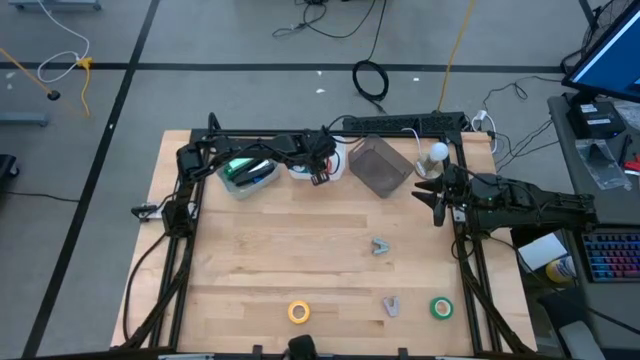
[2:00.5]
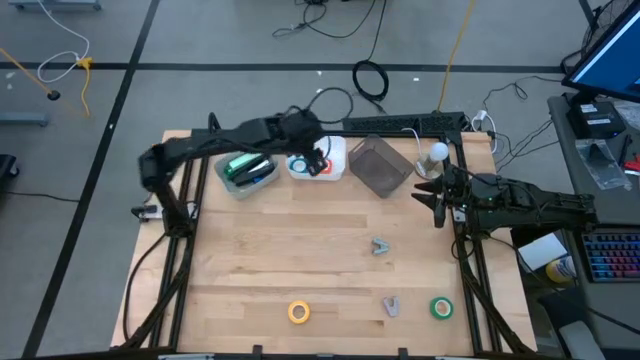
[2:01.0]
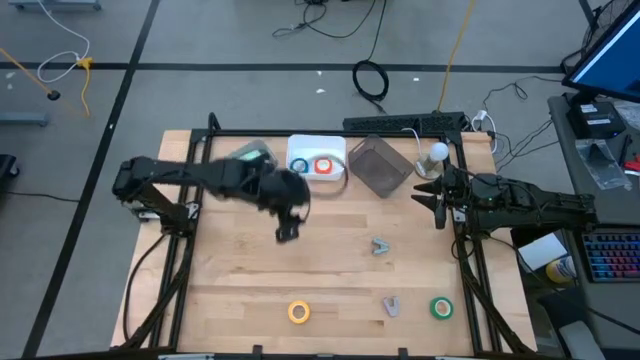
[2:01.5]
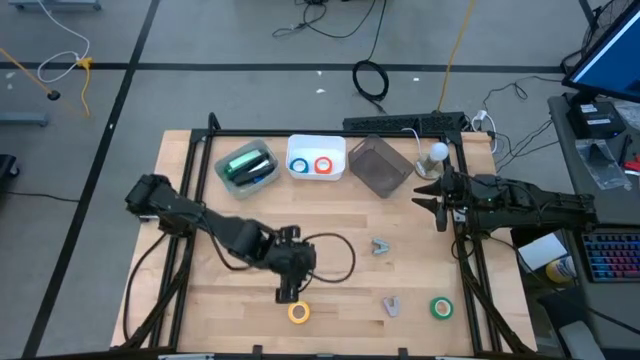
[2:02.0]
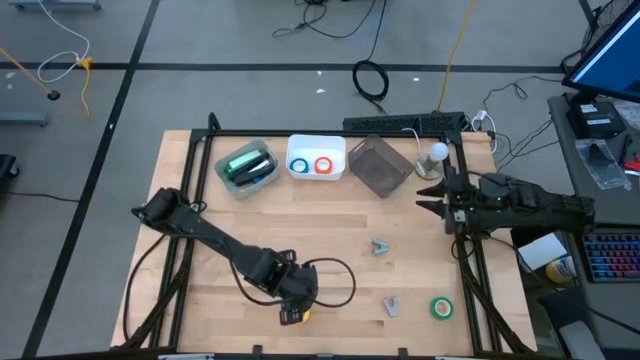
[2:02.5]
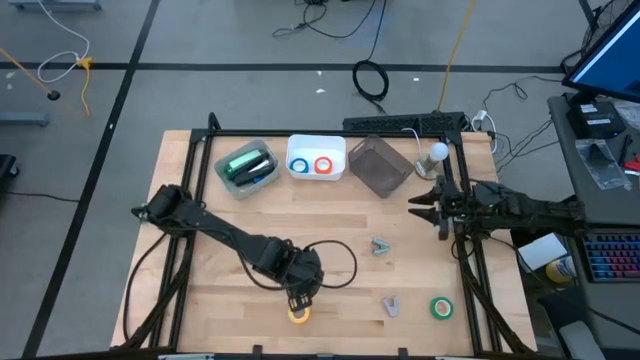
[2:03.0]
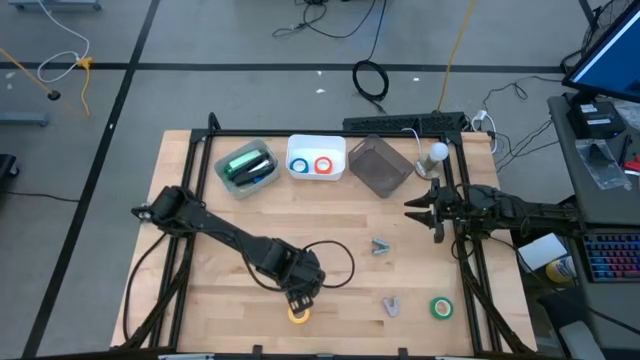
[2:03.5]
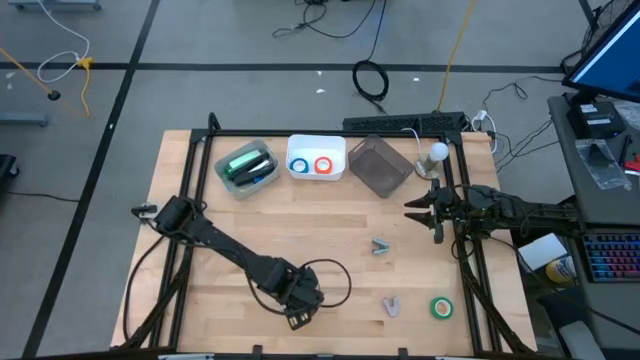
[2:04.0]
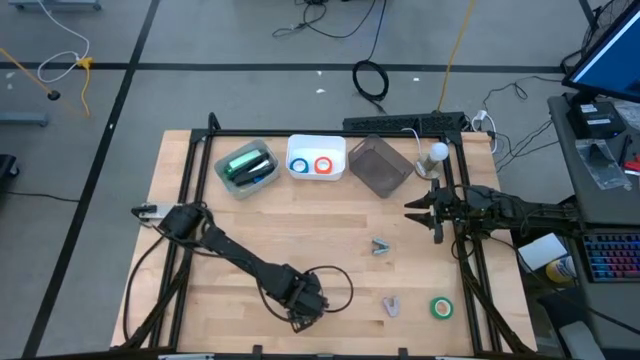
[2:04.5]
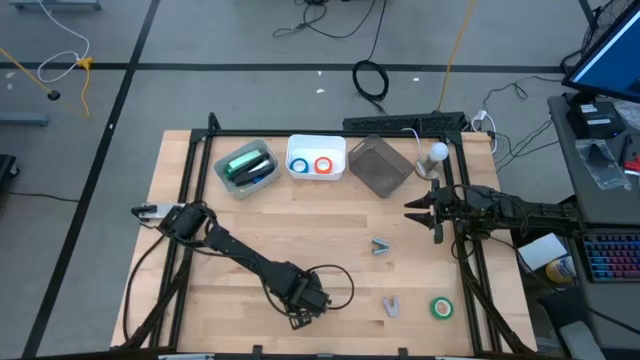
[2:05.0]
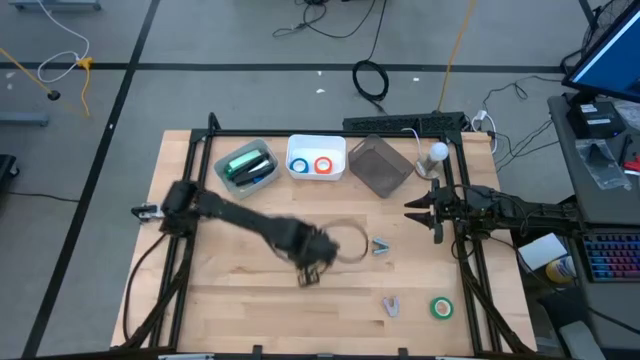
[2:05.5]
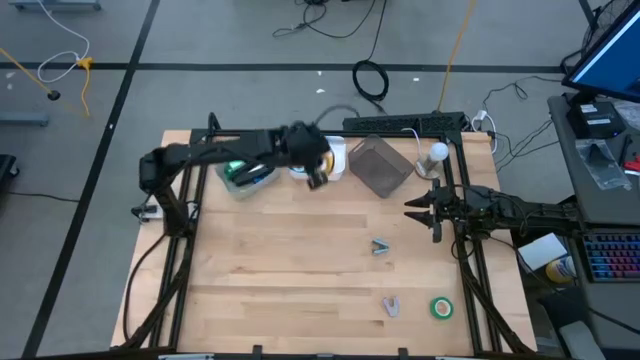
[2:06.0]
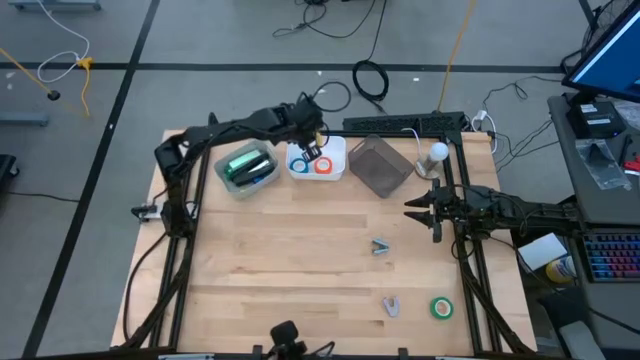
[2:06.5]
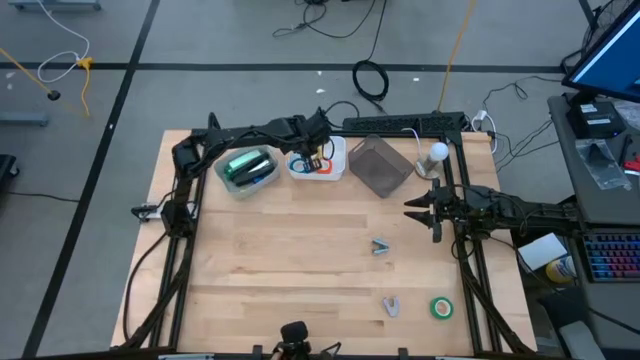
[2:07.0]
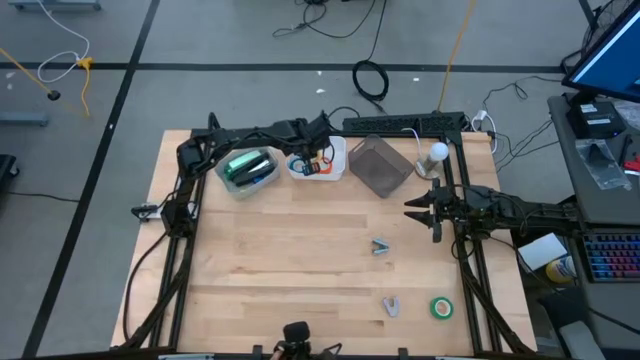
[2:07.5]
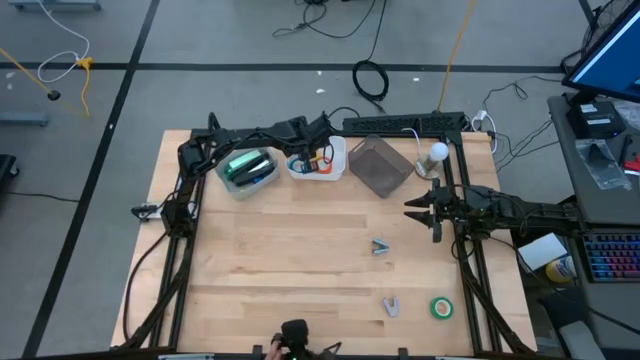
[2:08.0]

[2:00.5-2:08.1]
Task: Pick and place Stapler, Stapler remover, tape
Put the yellow tape into the white bin

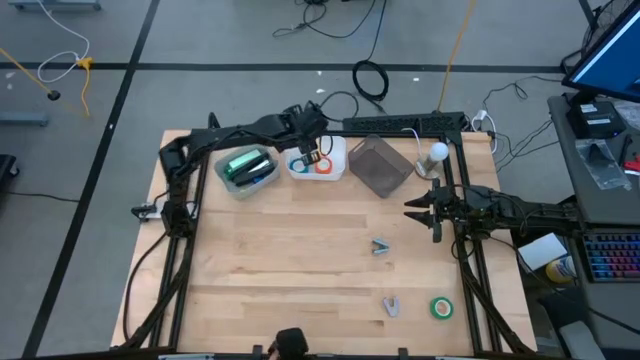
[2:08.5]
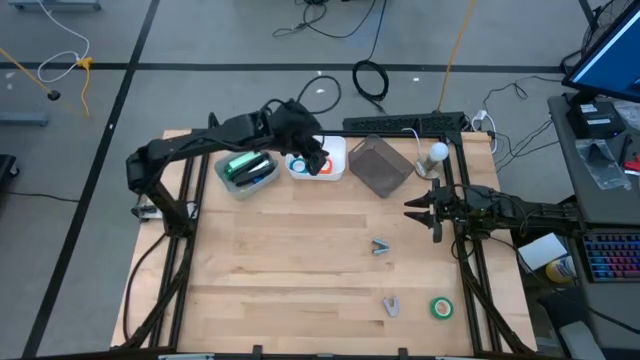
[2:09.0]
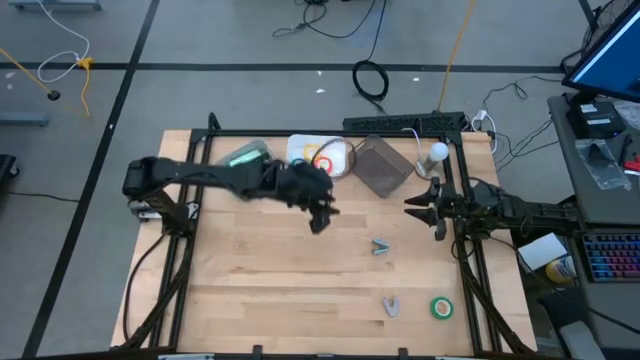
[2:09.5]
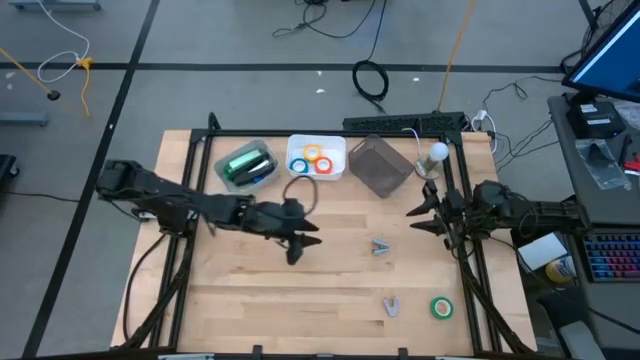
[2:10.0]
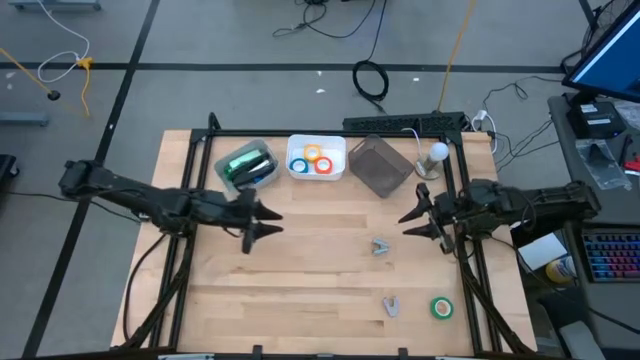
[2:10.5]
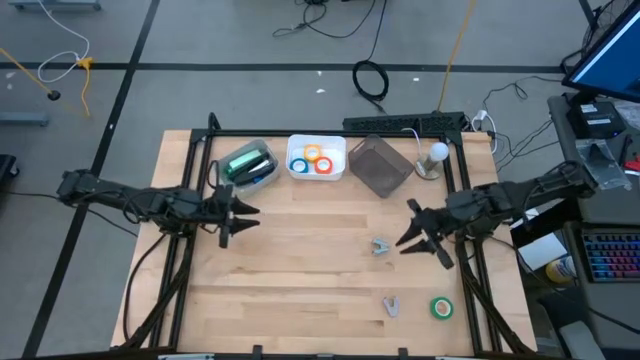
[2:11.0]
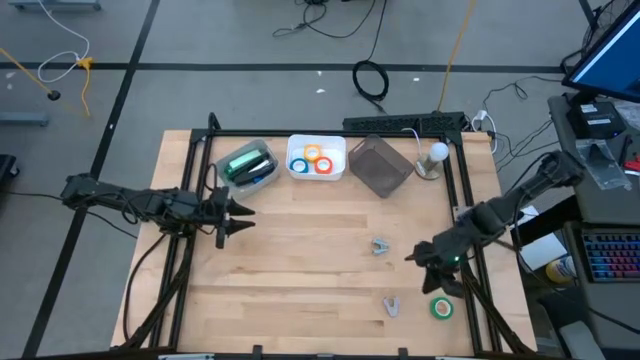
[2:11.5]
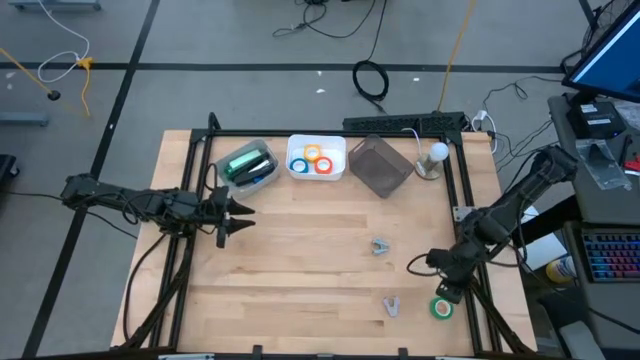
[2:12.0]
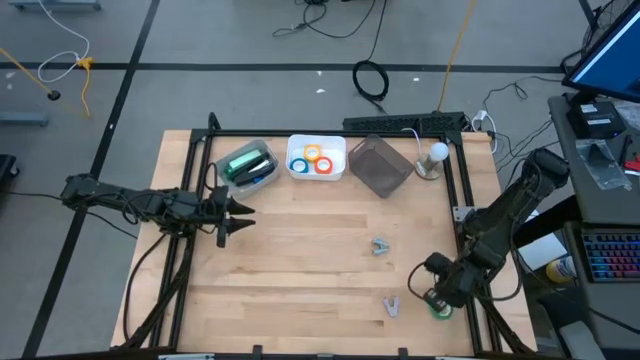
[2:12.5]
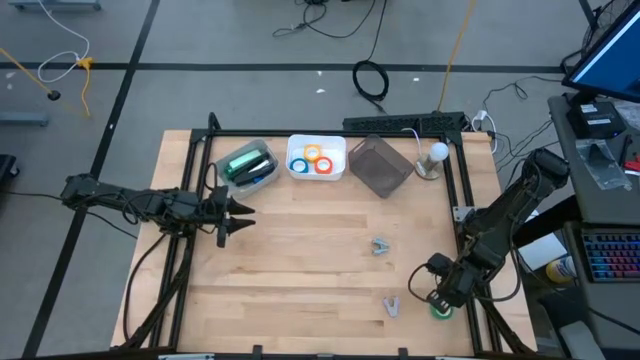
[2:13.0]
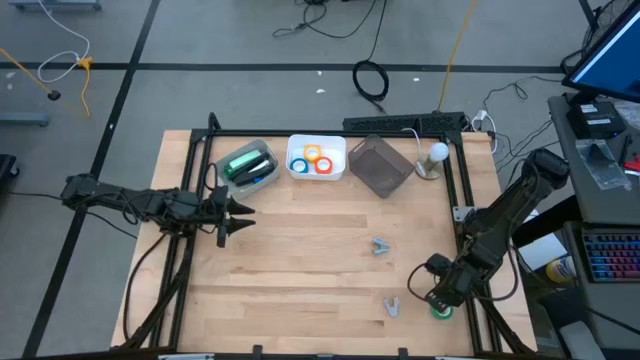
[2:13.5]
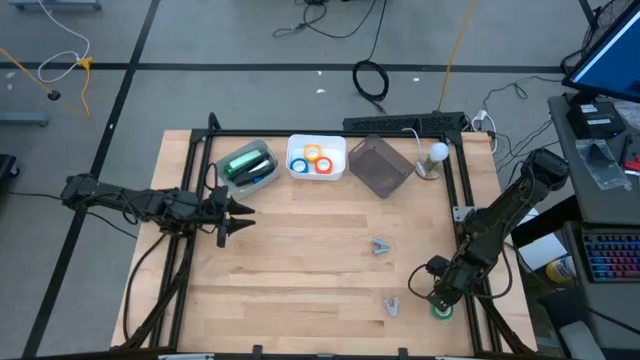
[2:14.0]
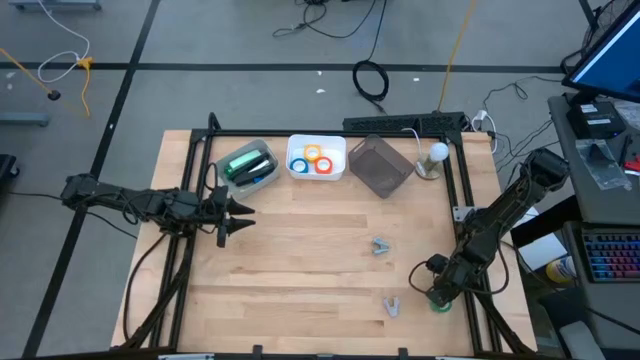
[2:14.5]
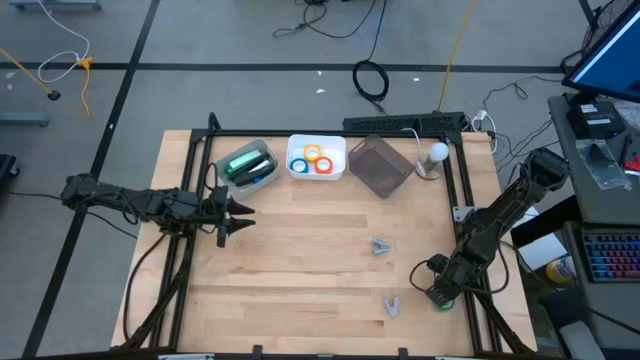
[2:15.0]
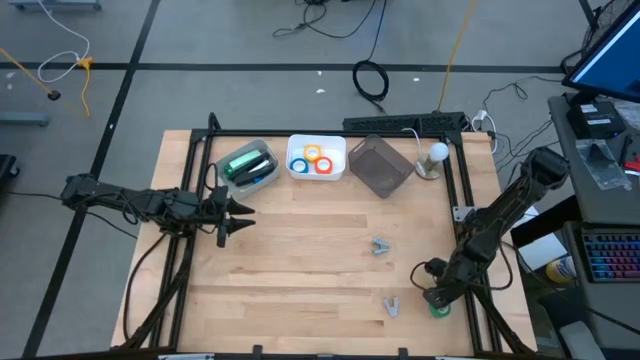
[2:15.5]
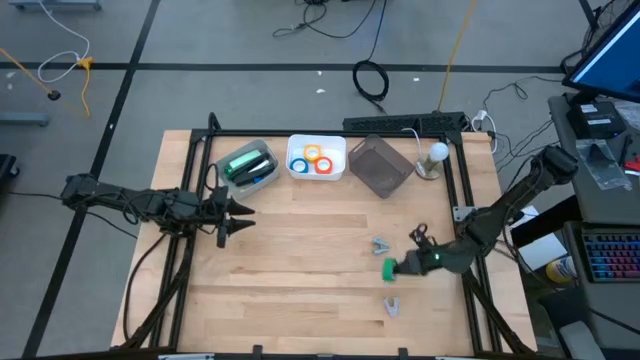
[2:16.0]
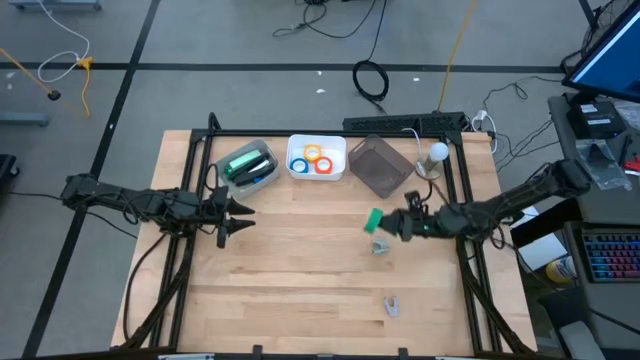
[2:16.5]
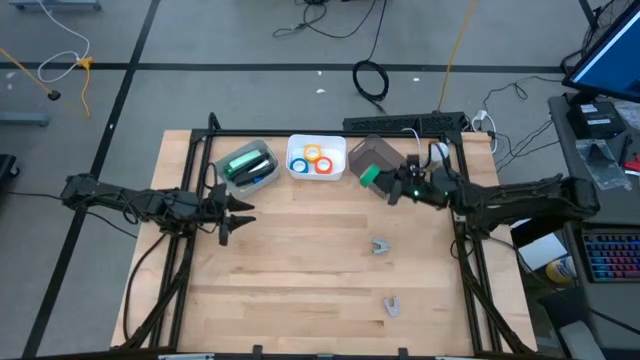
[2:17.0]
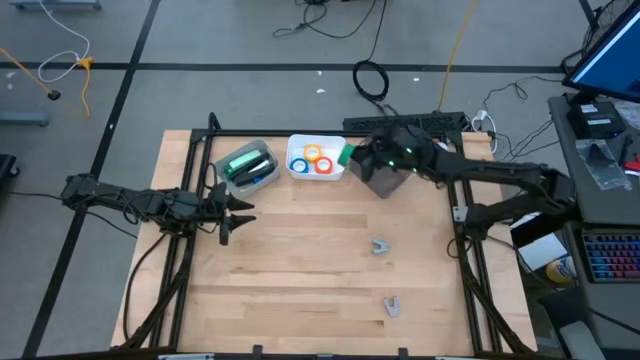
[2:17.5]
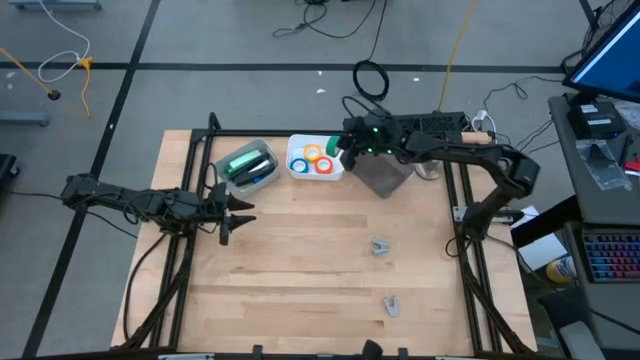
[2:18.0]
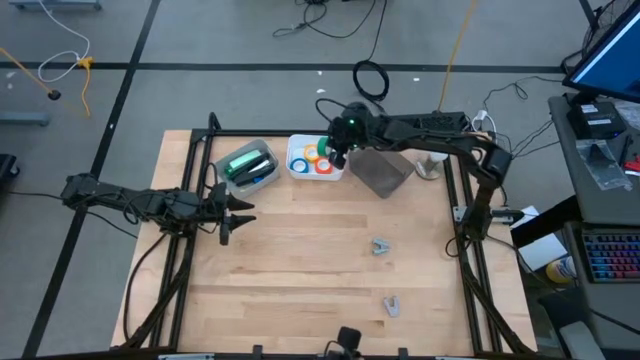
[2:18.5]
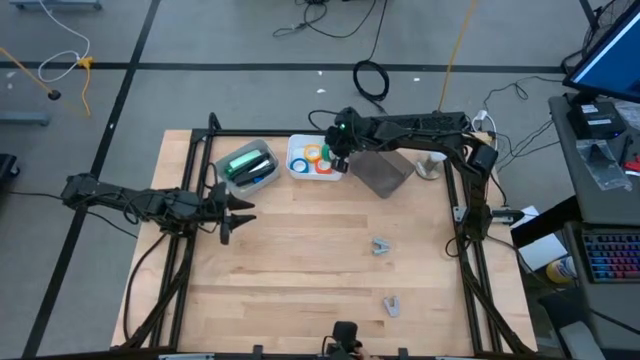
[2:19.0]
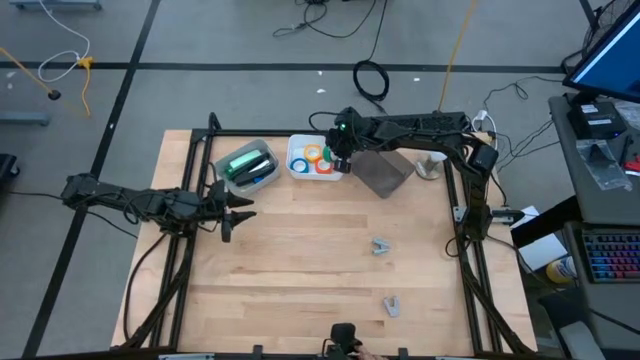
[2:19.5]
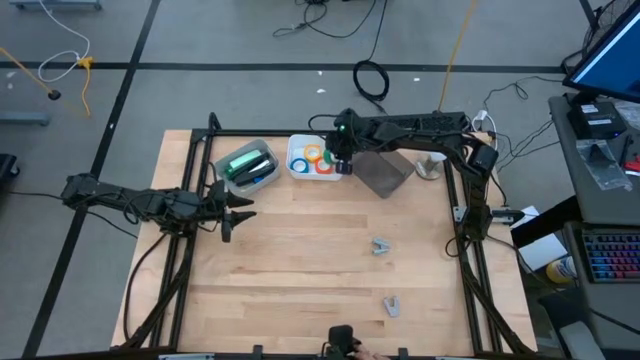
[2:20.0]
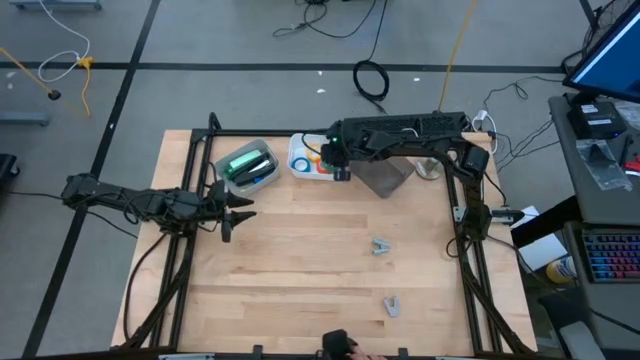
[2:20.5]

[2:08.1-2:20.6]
Put the green tape into the white bin

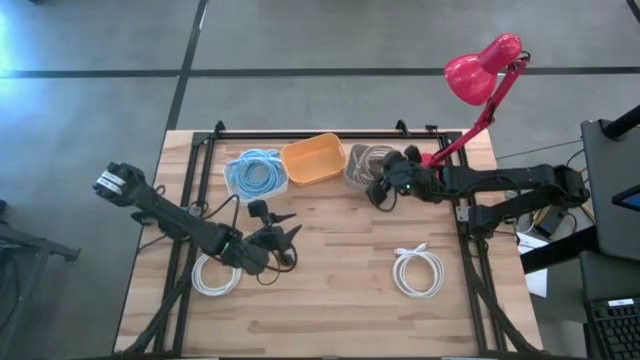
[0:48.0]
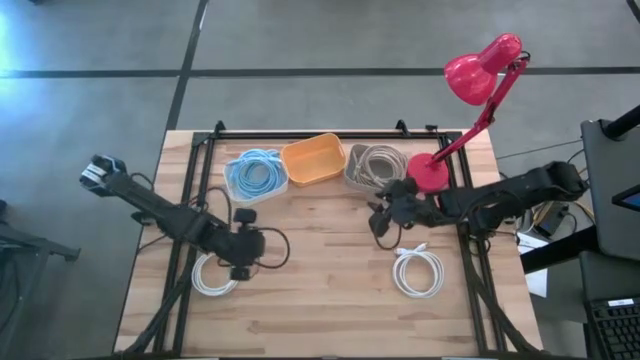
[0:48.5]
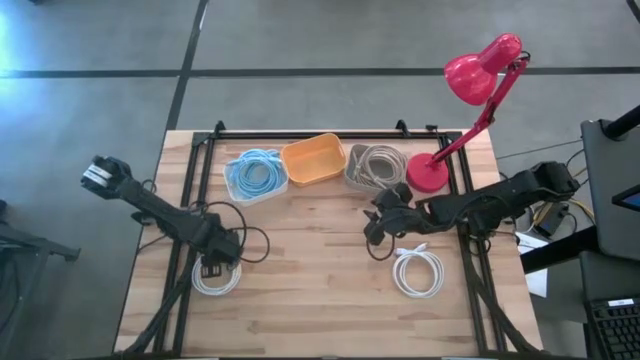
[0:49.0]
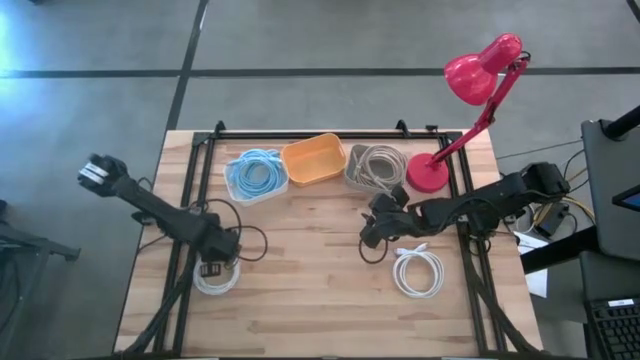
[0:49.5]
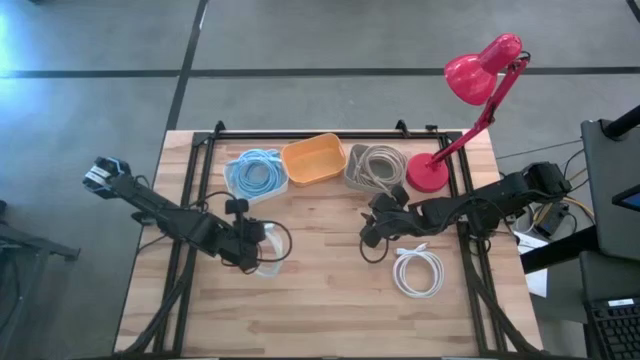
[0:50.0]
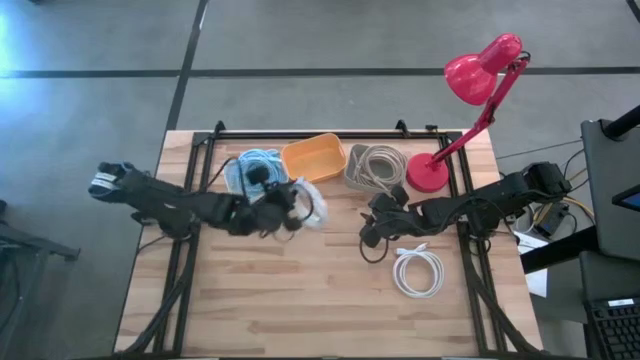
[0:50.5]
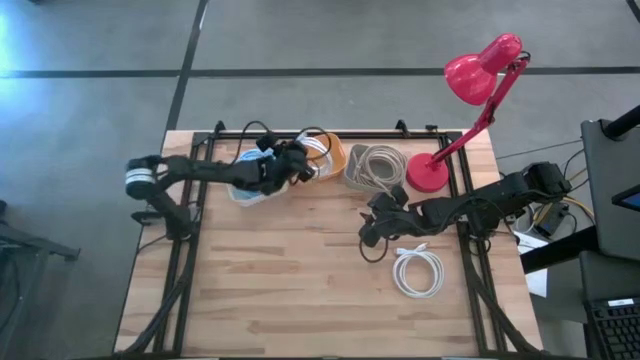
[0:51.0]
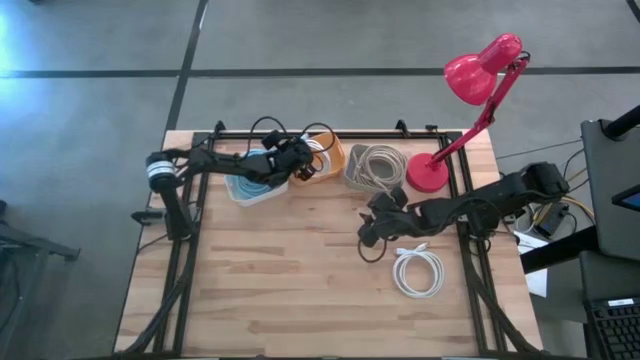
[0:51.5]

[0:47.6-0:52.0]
Task: Pick & Place USB Port
Put the left white charger cable into the yellow bin
